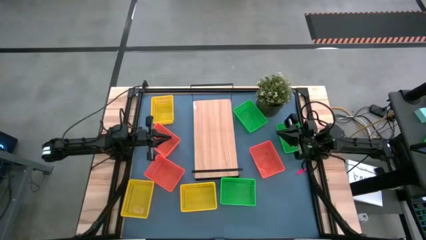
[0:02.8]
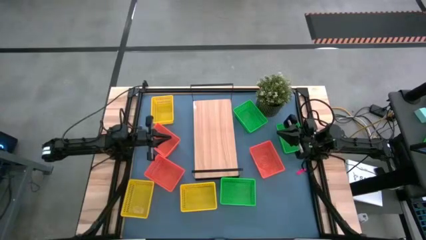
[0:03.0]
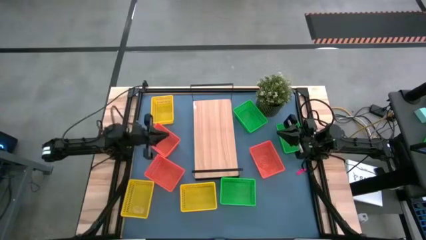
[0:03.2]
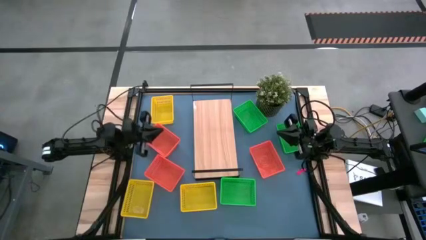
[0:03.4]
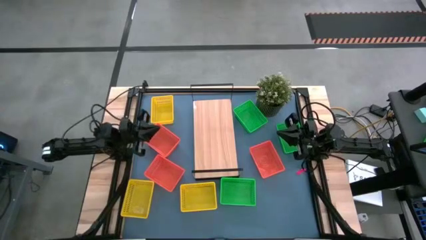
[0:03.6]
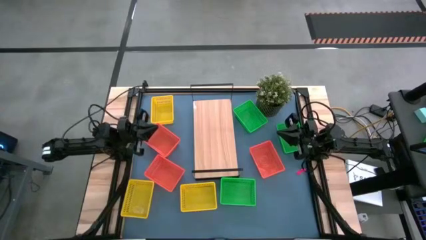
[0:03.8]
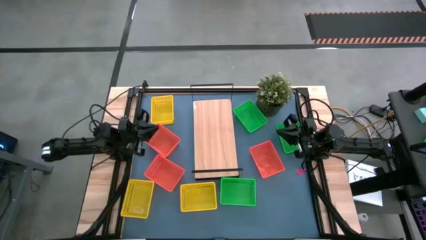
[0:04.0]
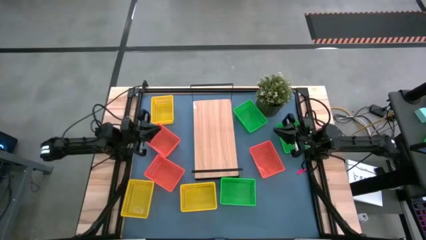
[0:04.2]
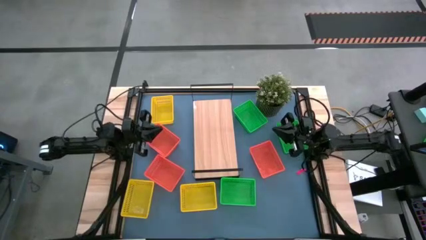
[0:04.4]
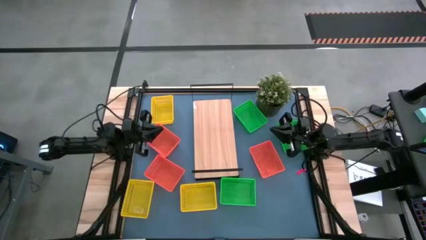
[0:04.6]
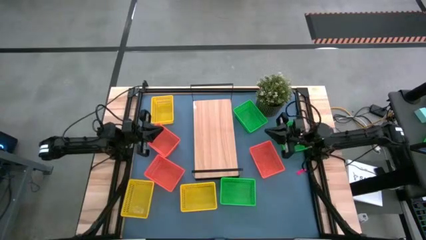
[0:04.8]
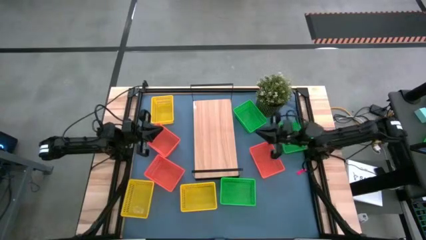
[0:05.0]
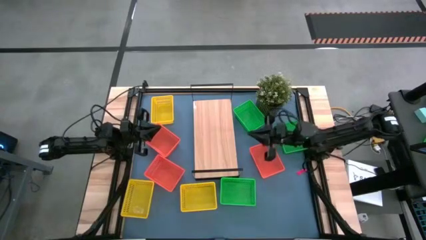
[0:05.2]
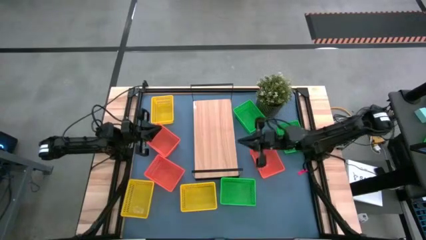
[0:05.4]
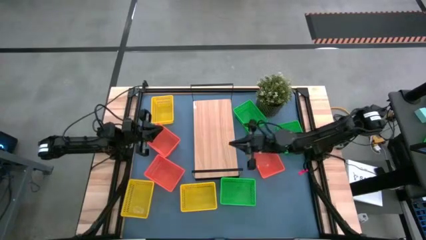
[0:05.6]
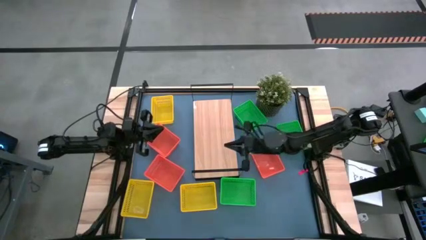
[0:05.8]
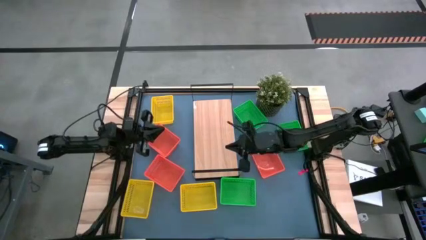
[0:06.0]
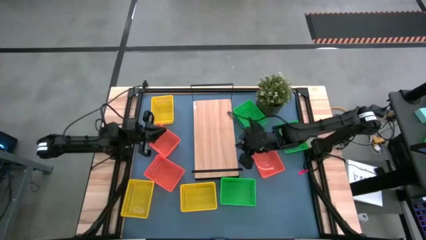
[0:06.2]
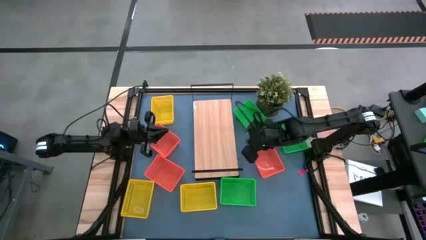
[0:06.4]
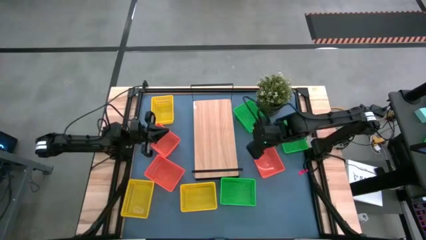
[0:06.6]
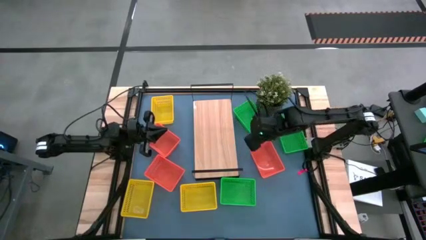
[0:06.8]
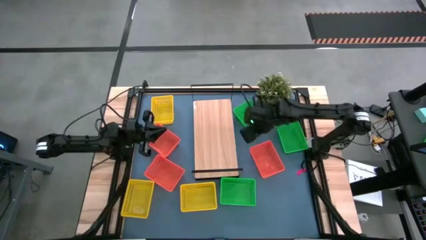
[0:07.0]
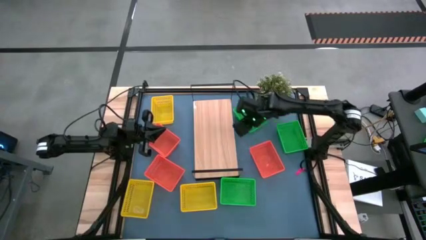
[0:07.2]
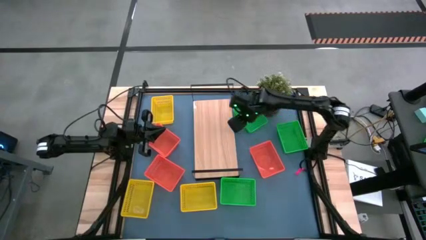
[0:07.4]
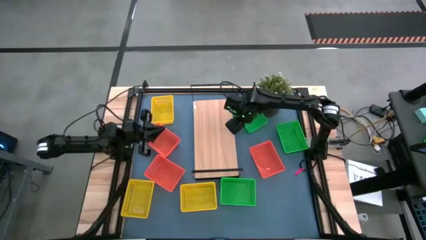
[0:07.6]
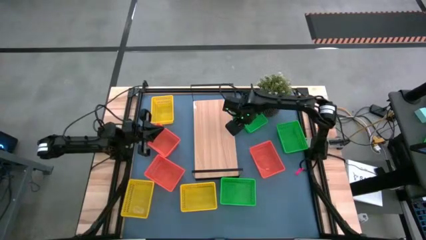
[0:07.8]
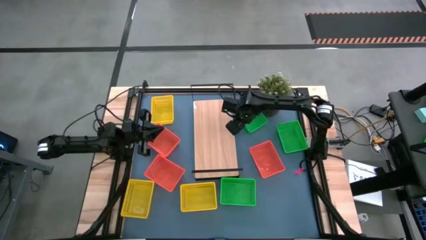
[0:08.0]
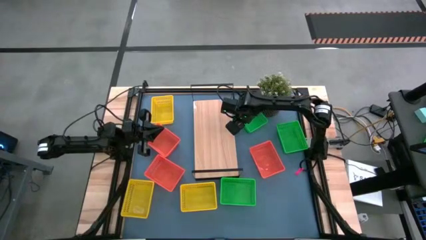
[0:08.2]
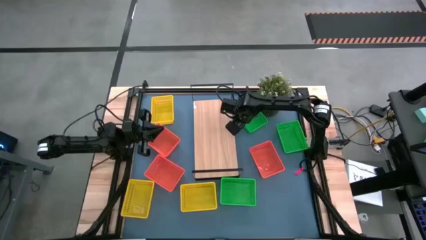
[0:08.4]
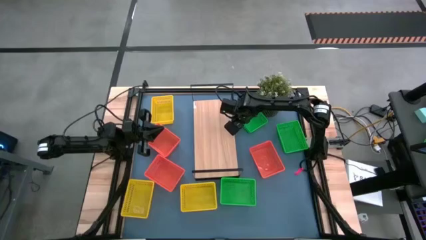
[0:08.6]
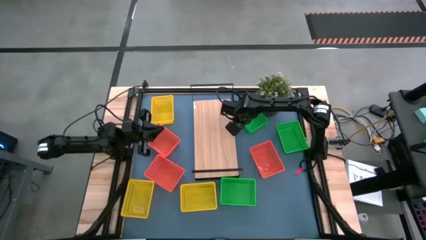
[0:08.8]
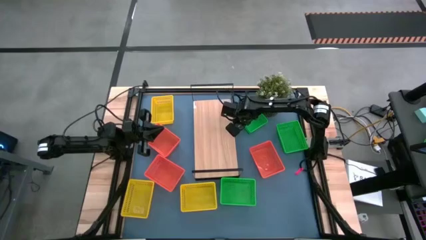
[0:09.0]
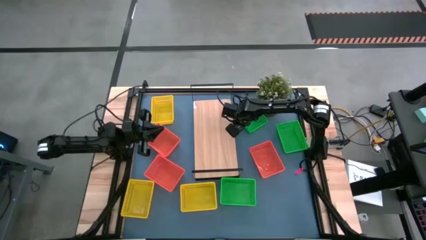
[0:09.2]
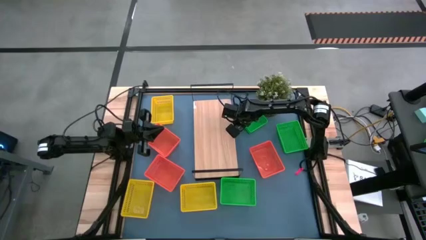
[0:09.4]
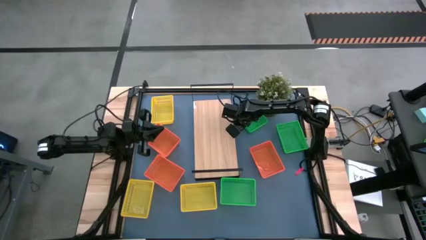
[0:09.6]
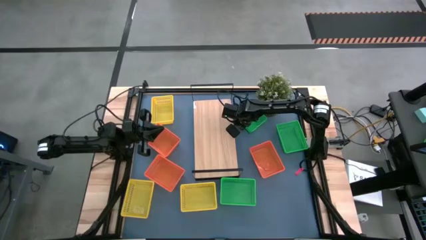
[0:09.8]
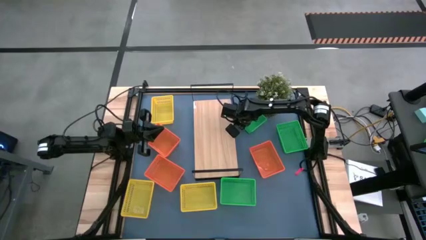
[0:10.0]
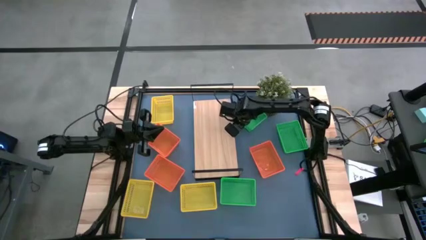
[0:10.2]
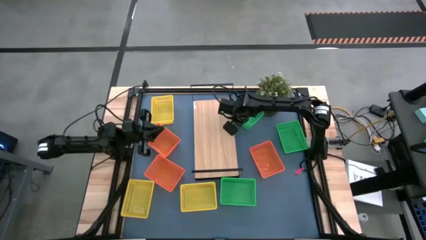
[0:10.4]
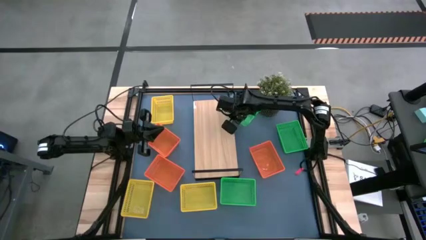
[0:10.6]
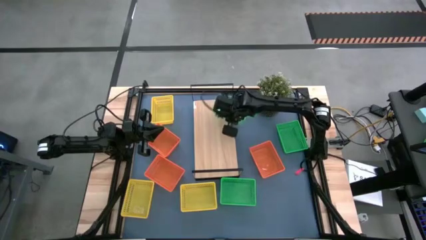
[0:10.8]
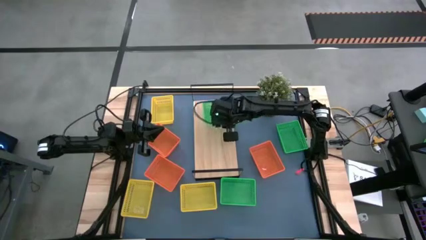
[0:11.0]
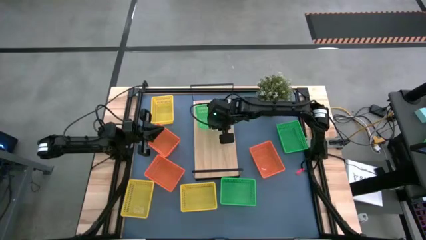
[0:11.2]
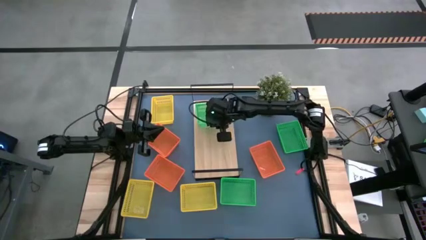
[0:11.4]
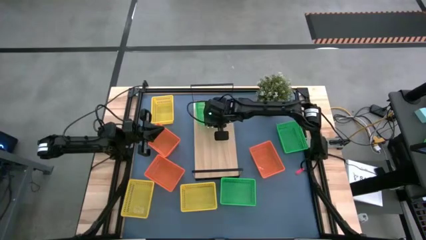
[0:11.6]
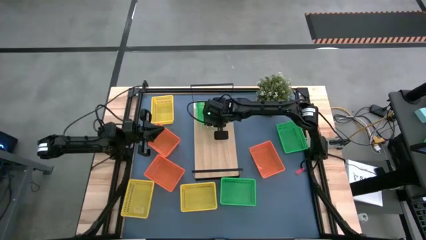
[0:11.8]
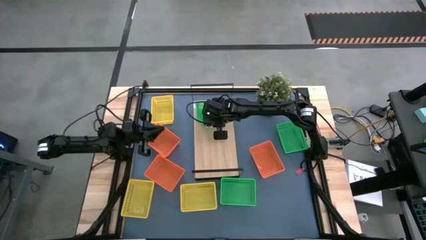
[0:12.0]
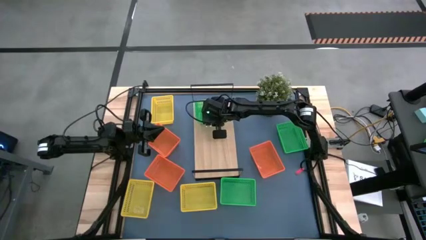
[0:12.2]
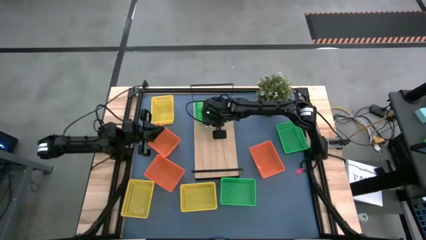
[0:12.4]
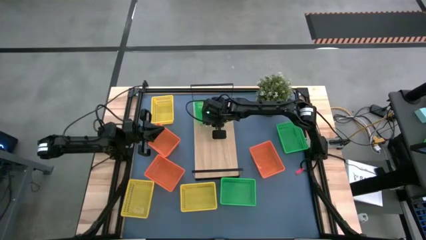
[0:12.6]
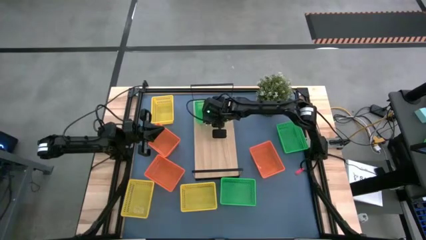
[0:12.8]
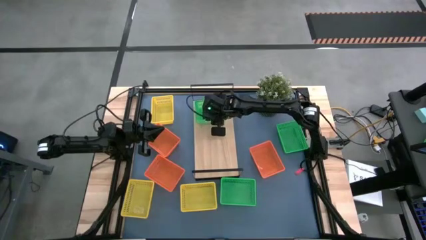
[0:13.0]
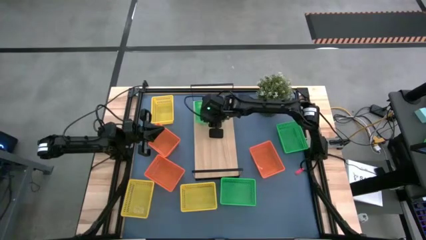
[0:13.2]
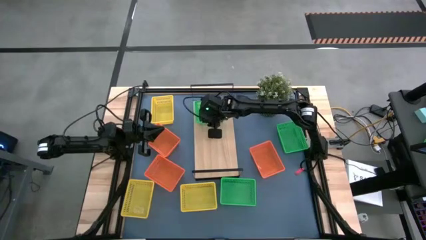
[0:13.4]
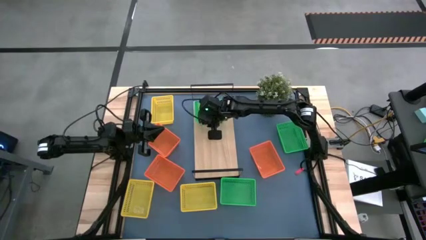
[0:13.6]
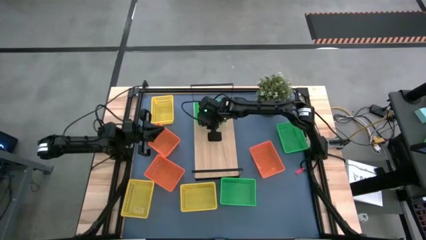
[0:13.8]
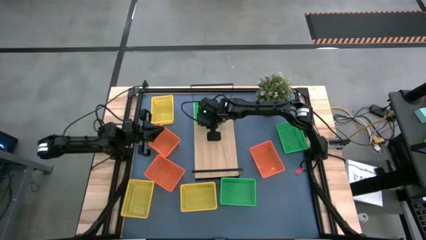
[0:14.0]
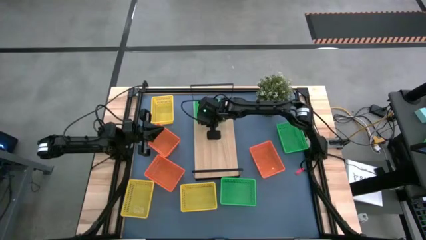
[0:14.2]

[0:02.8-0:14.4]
Task: Stack baskets on shelf by color
Put the top center green bin on the shelf
